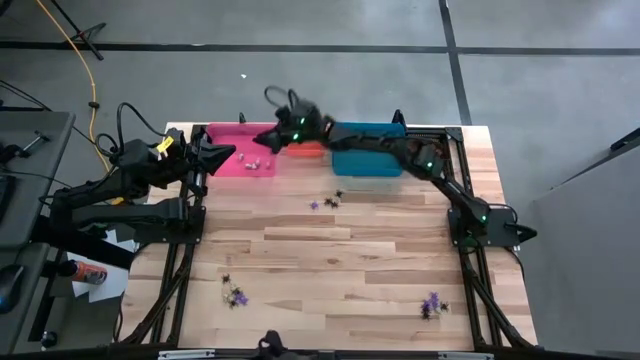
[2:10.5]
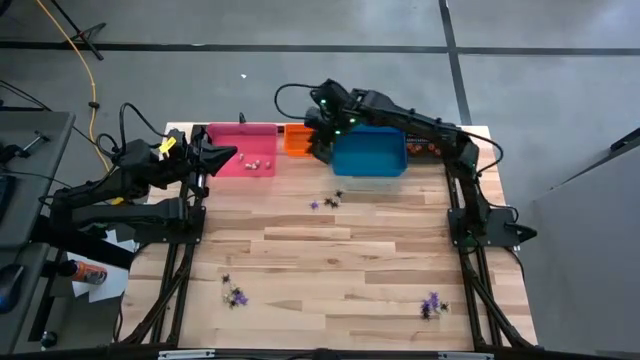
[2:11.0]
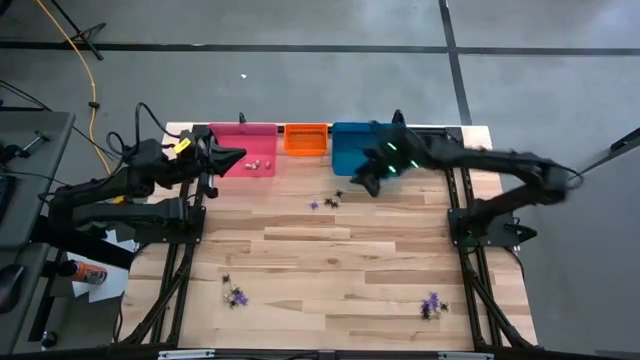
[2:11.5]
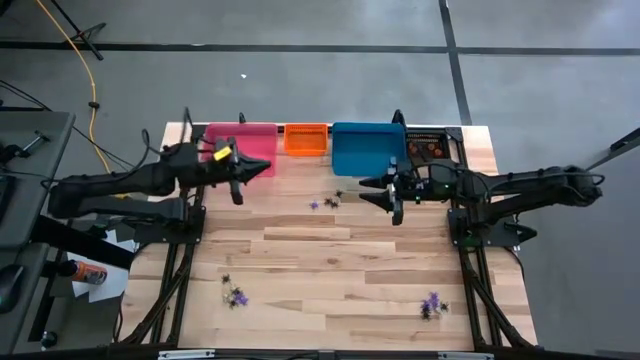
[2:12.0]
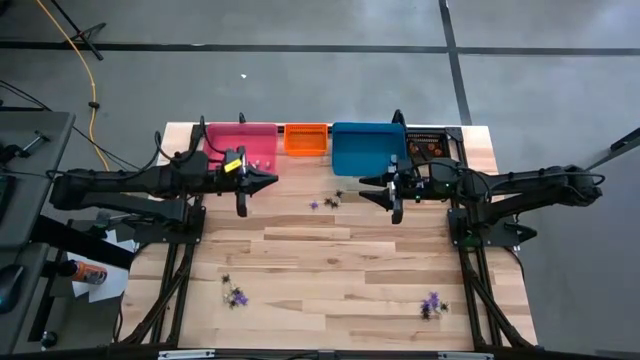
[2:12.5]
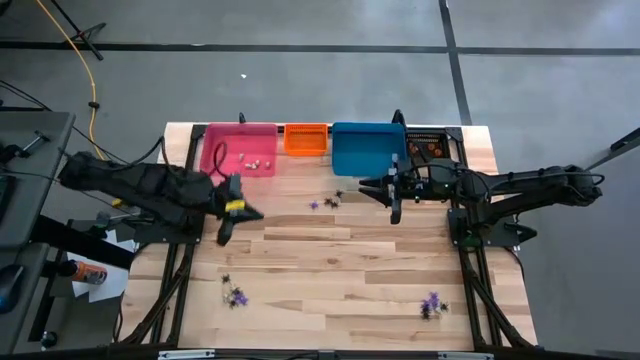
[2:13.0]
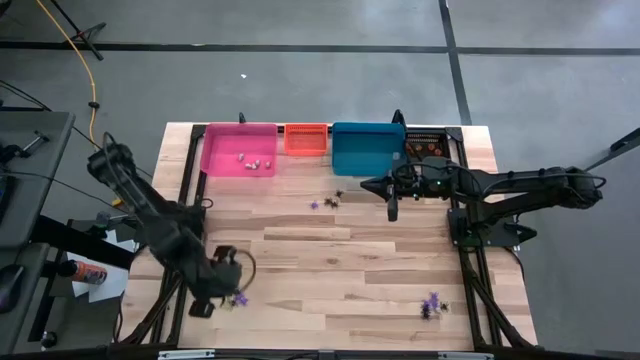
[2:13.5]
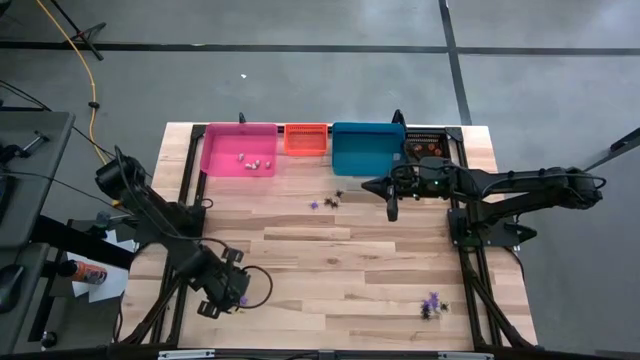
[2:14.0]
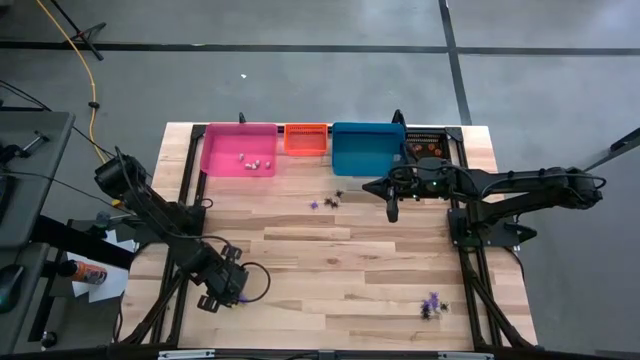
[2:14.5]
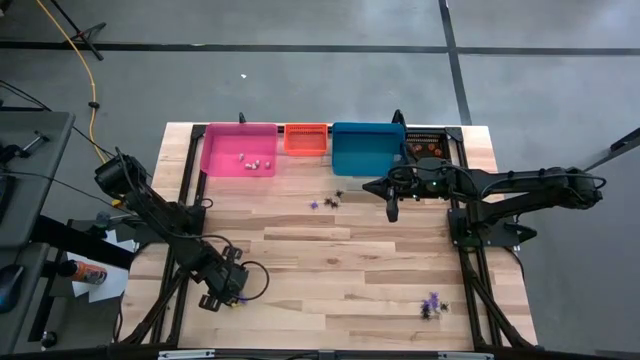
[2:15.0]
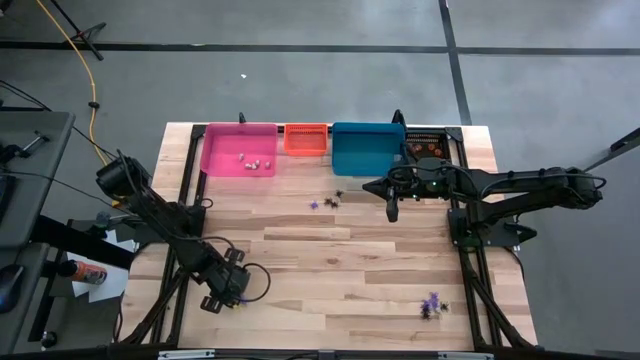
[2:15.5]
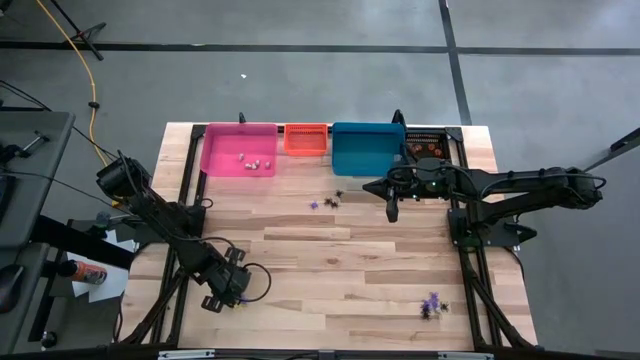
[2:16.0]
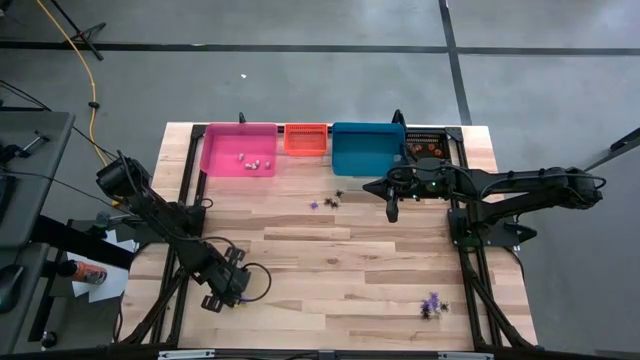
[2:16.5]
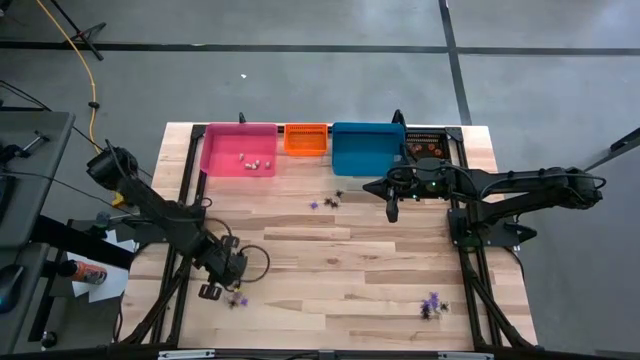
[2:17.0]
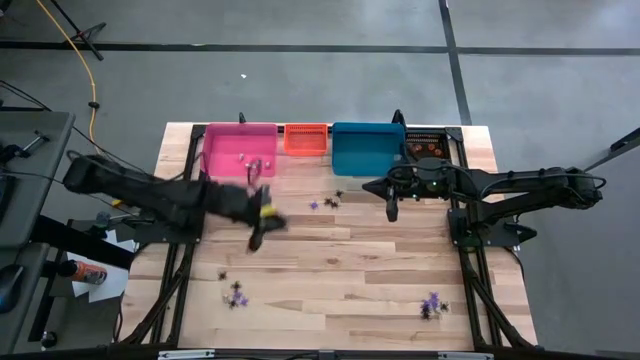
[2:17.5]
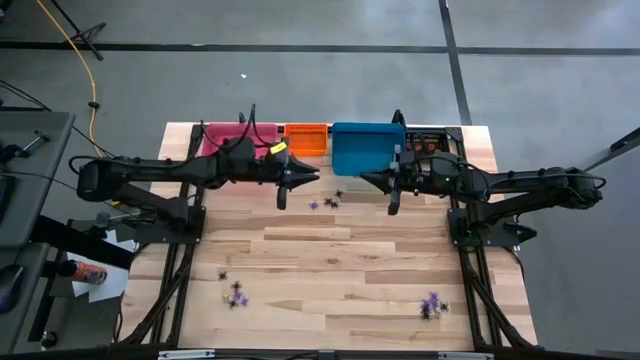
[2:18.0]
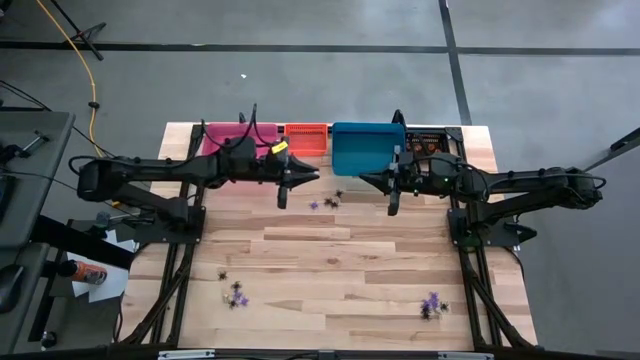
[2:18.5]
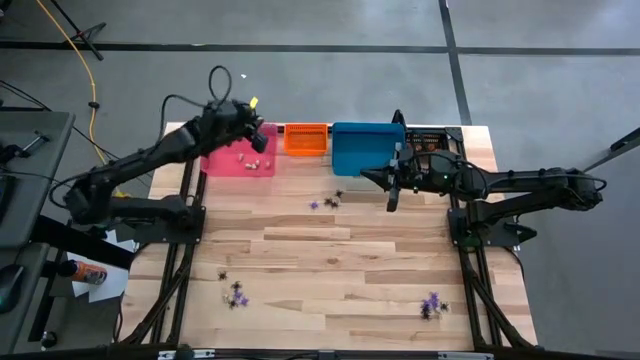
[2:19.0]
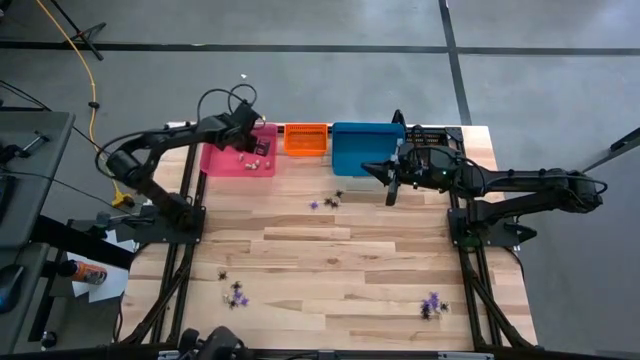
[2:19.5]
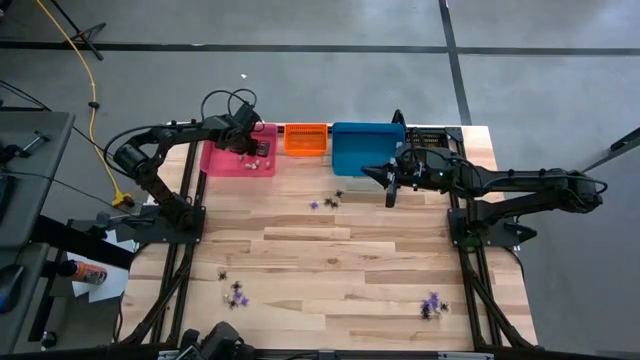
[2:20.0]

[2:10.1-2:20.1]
Task: Sort Halloween decoration
Put the white skull toy into the pink bin

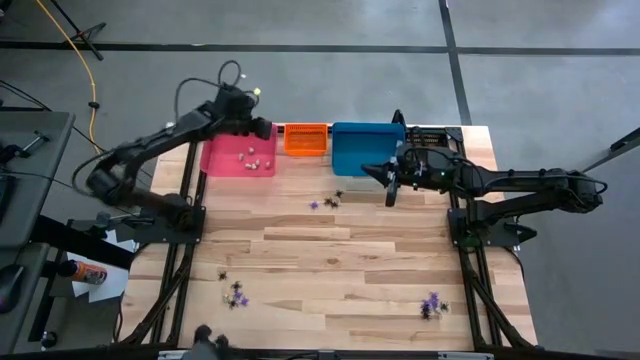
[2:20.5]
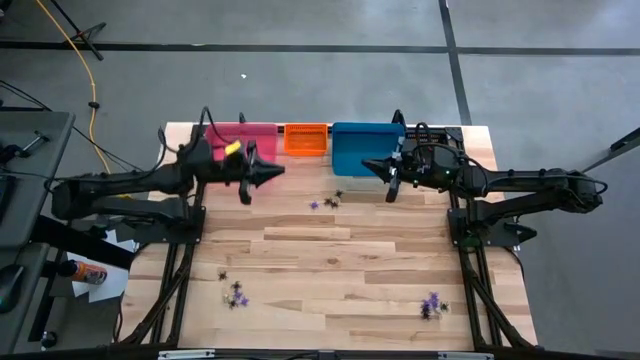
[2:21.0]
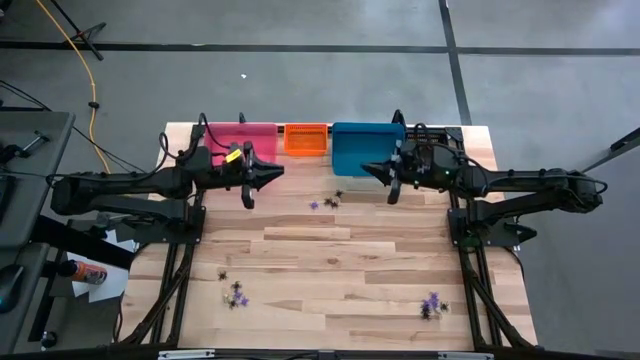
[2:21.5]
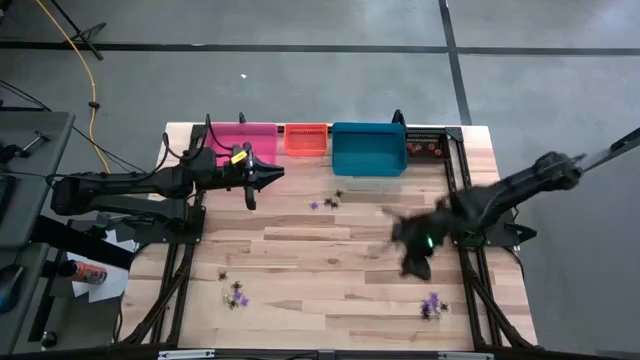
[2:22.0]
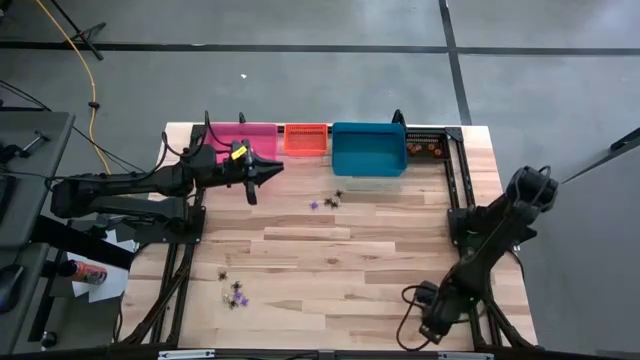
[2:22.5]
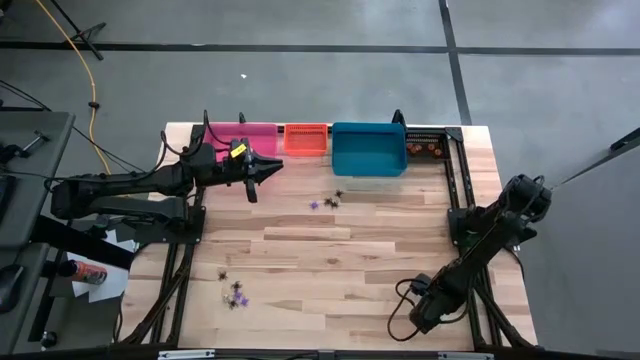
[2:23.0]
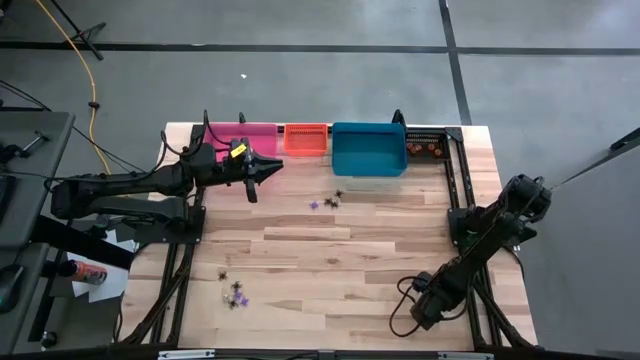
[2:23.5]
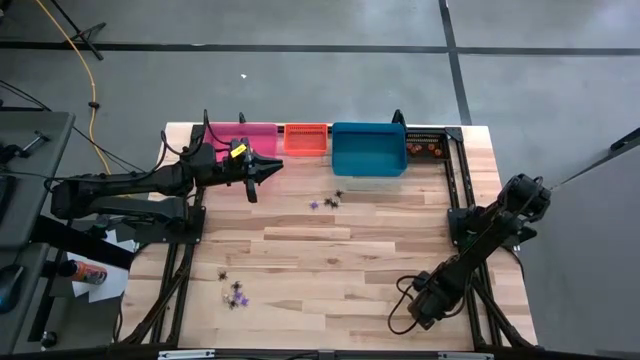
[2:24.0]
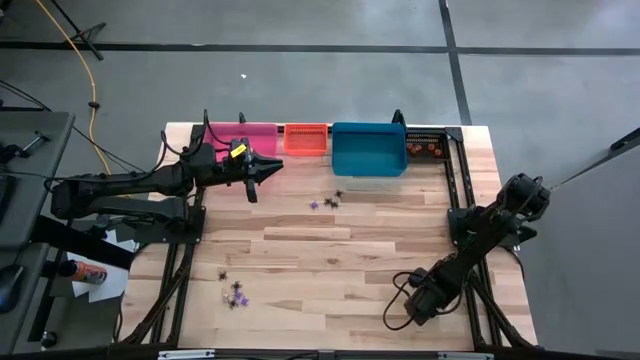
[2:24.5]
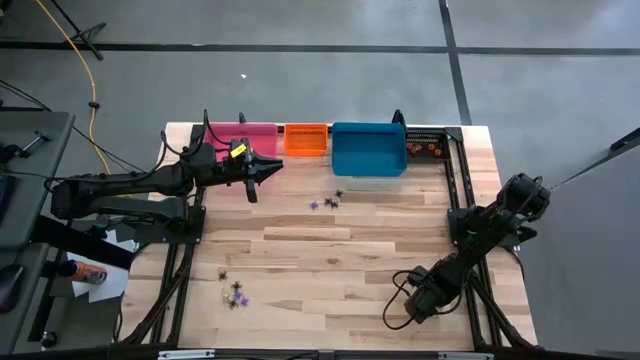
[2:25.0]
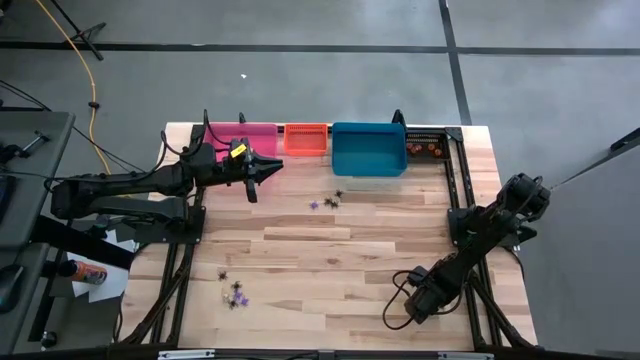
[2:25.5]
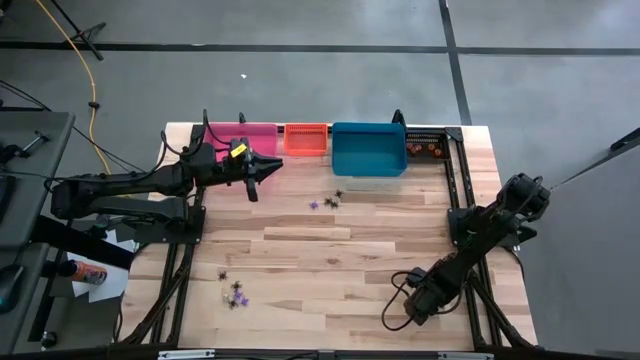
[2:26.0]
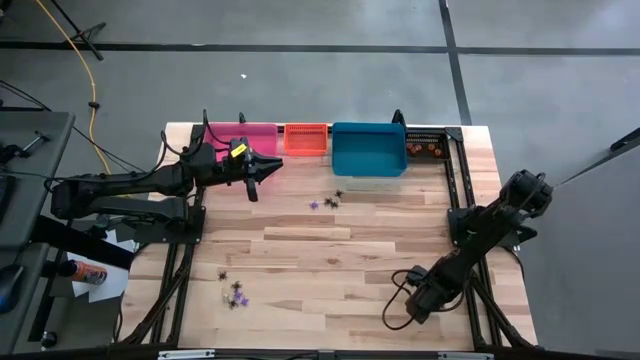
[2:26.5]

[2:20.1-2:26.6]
Put the white skull toy into the pink bin

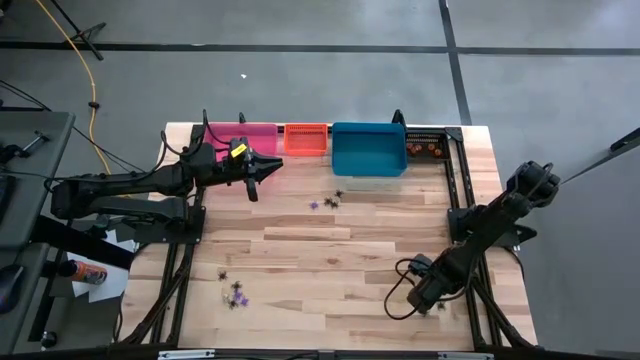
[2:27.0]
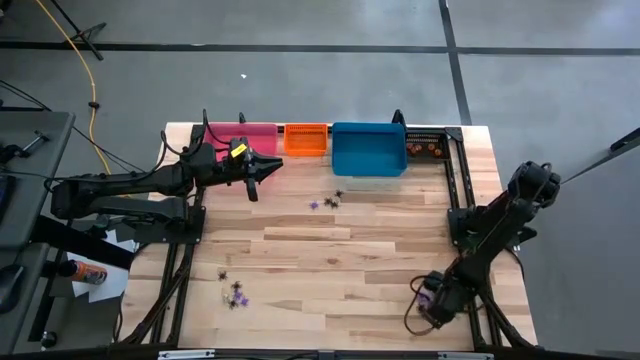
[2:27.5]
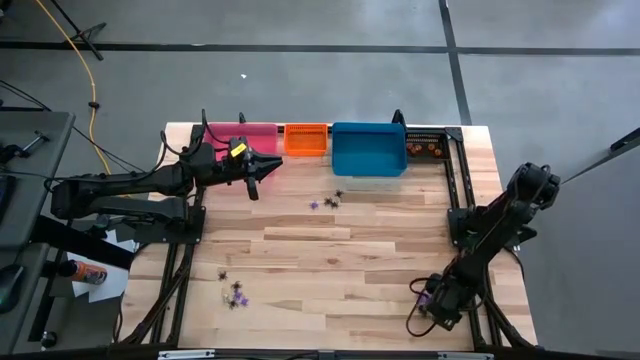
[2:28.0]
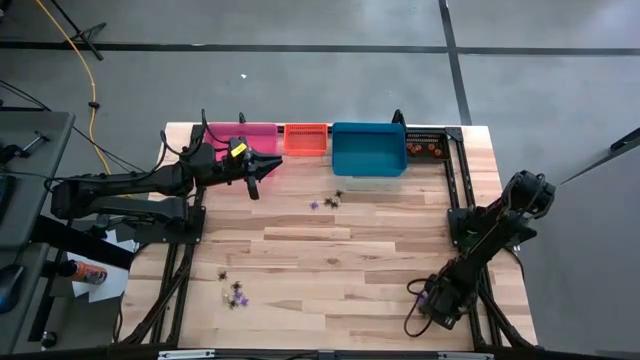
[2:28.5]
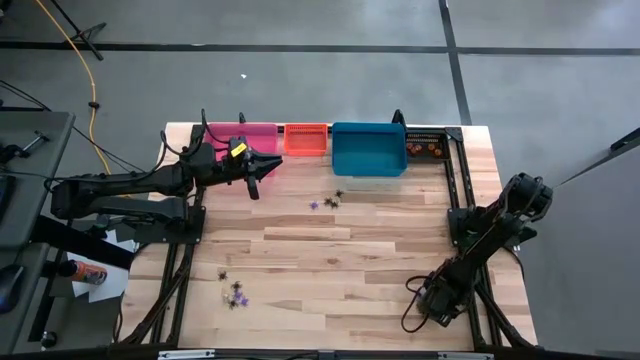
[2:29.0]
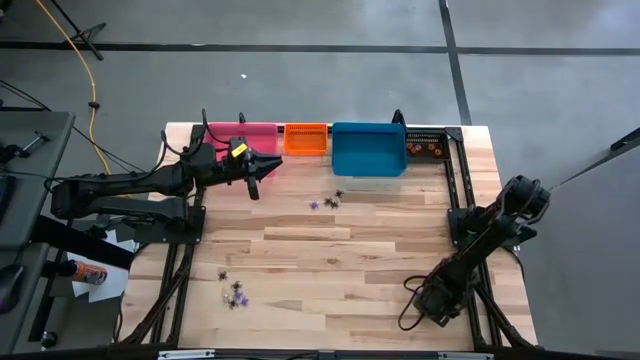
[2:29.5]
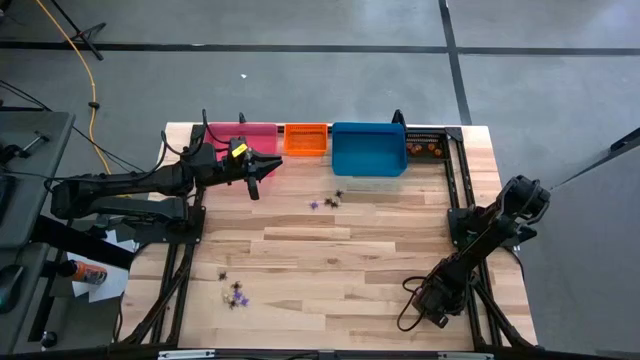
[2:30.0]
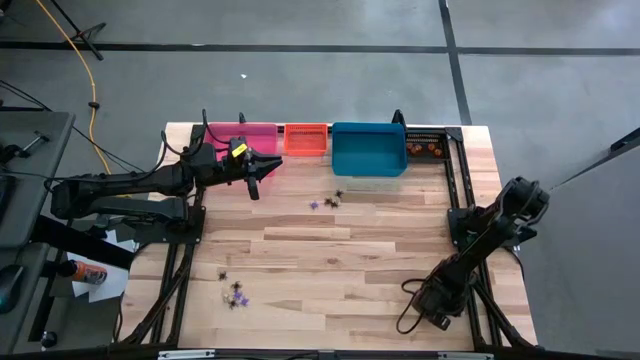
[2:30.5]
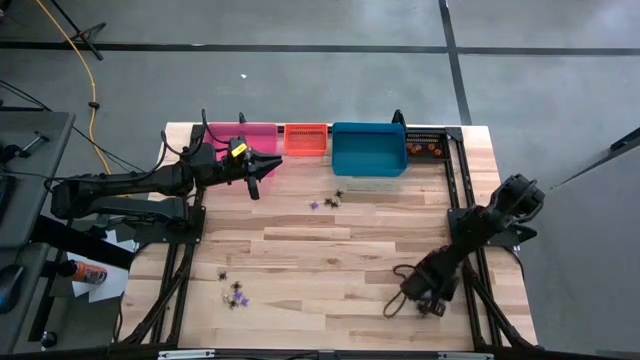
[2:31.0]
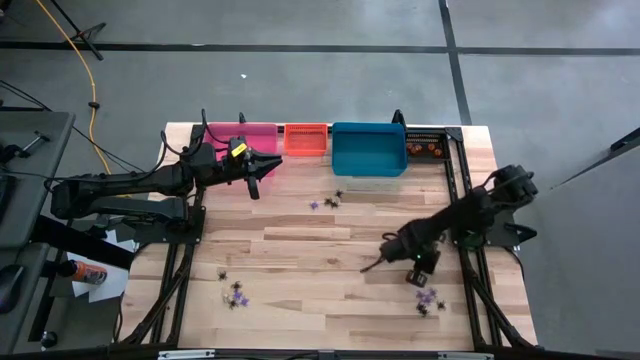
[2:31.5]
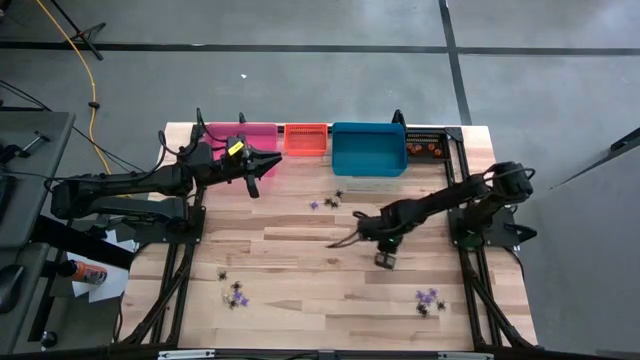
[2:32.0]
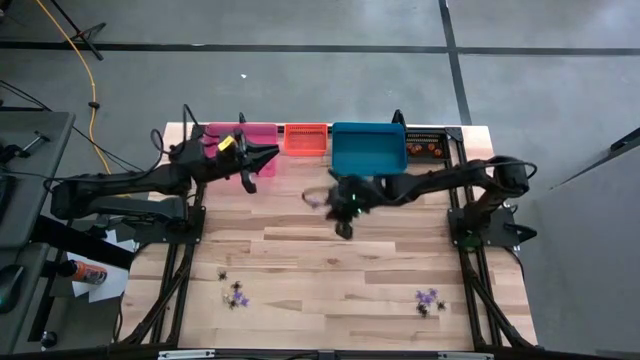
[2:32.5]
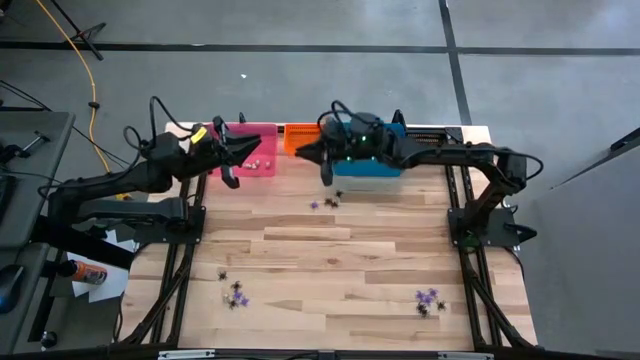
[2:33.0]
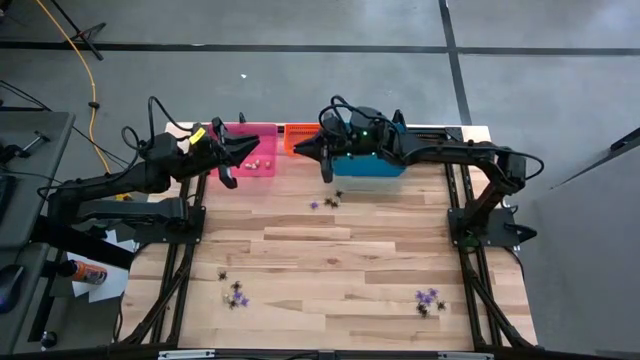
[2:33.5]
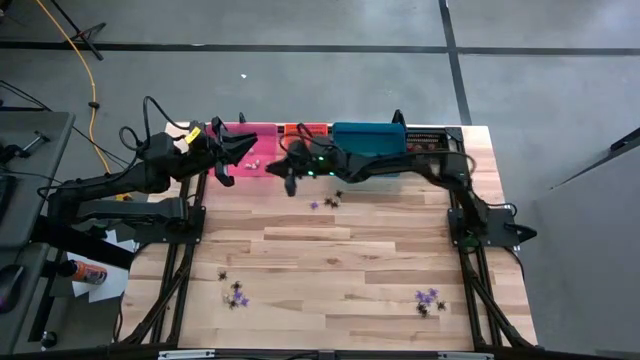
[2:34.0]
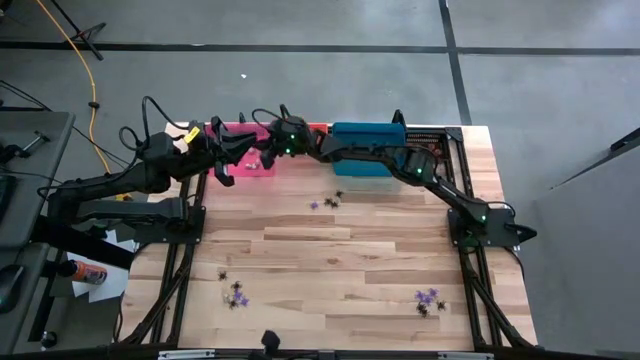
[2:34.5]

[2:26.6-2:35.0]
Put the white skull toy into the pink bin
